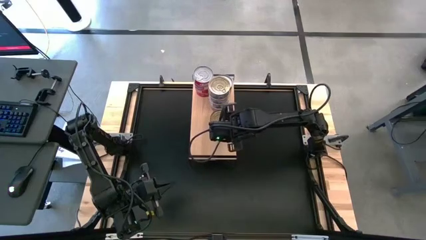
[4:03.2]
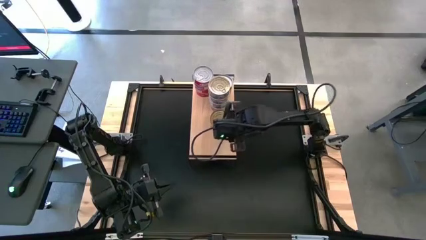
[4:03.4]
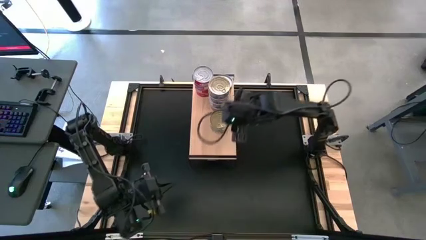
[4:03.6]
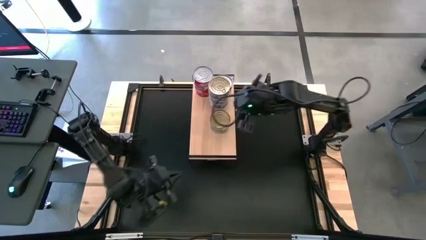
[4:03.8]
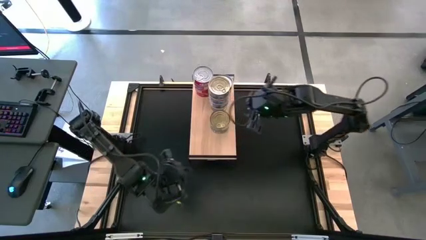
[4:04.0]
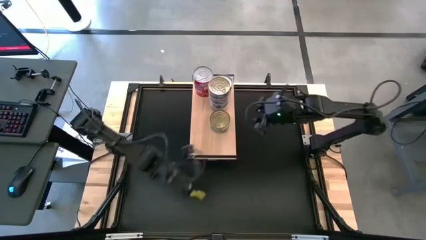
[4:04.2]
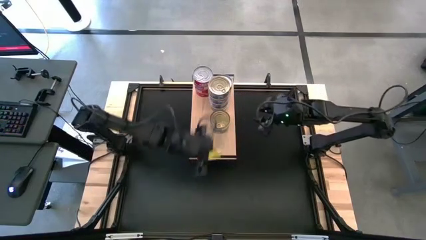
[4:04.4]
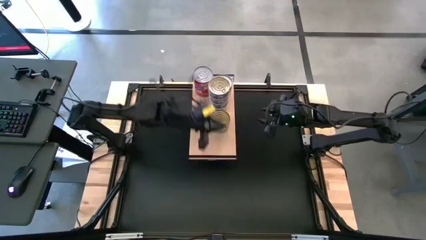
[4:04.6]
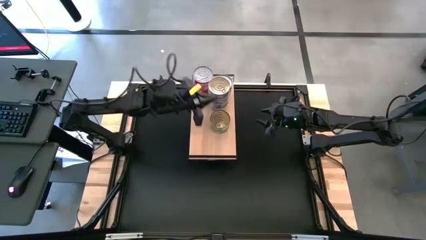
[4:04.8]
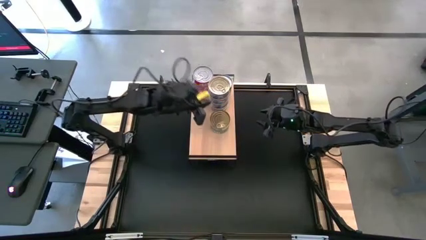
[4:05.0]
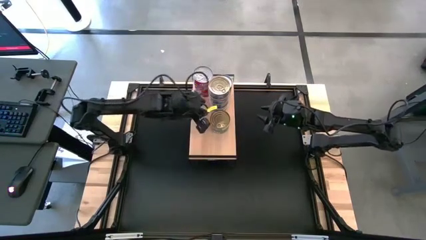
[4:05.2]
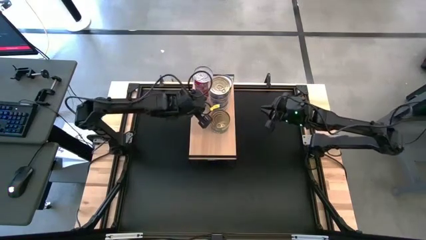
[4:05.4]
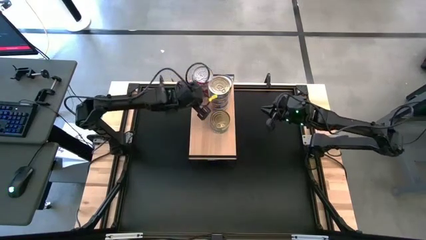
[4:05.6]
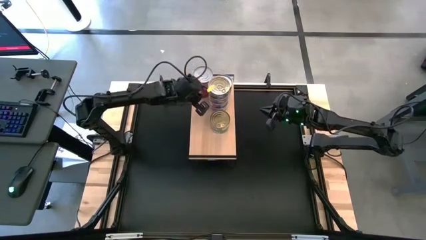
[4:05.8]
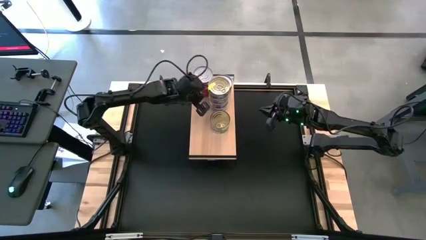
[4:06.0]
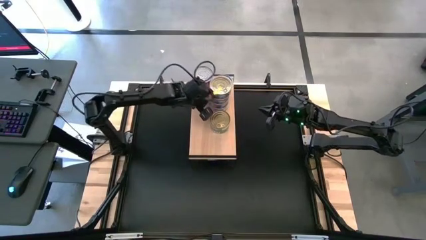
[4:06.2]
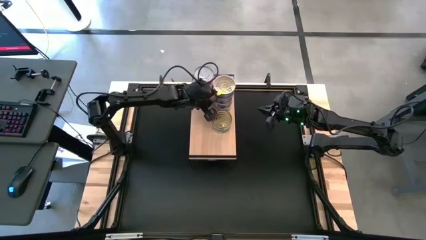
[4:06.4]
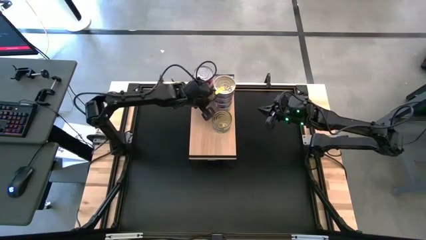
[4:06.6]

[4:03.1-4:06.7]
Task: Stack canned seafood by type on shelf
Adjust the stacked tuna cans on the shelf

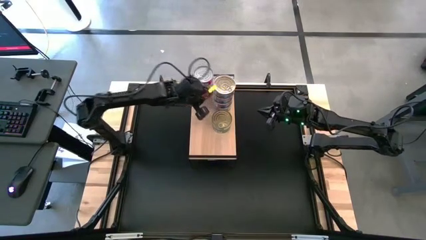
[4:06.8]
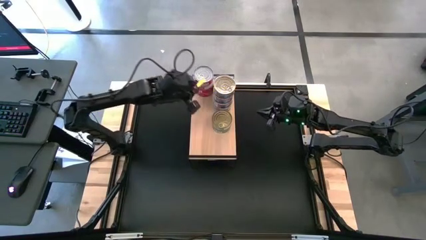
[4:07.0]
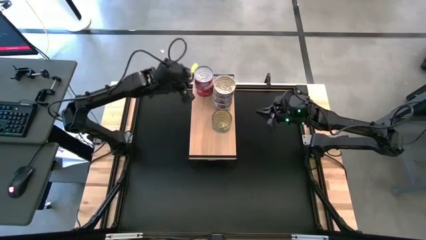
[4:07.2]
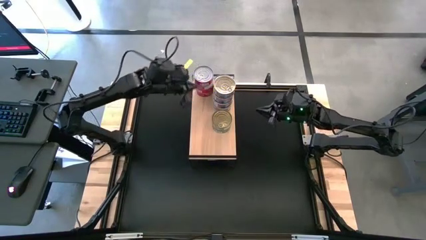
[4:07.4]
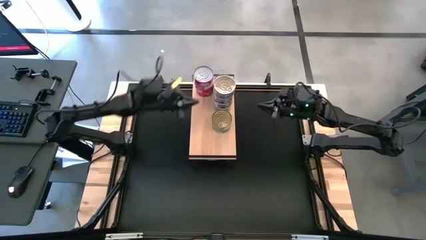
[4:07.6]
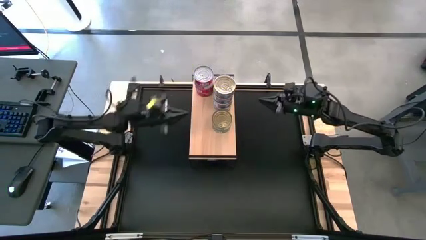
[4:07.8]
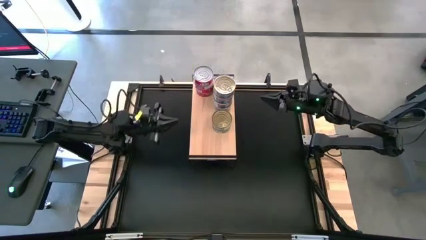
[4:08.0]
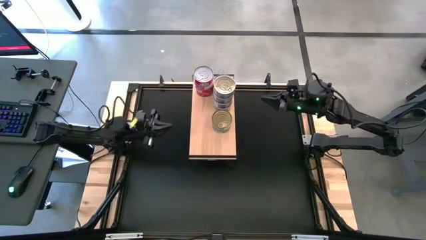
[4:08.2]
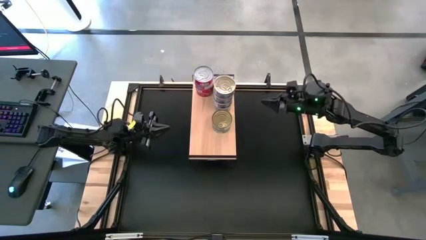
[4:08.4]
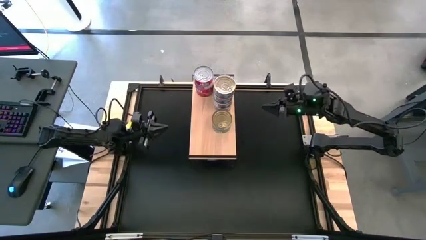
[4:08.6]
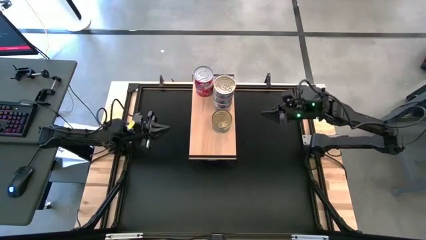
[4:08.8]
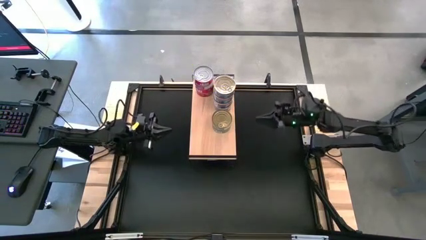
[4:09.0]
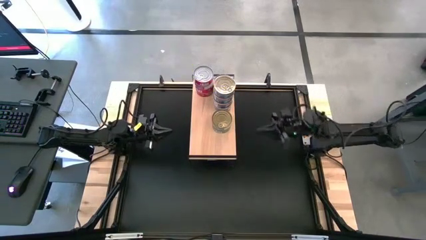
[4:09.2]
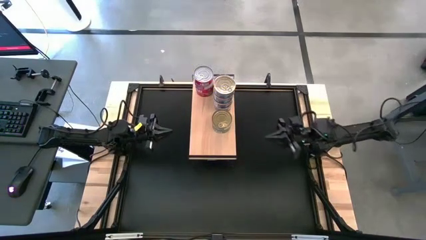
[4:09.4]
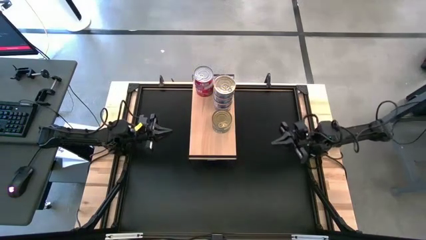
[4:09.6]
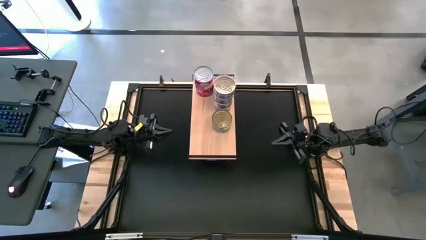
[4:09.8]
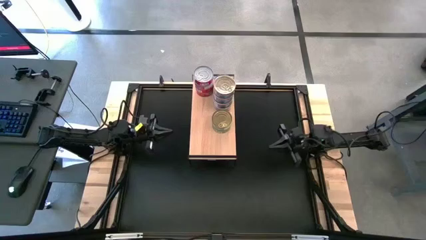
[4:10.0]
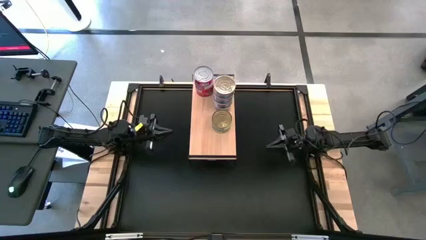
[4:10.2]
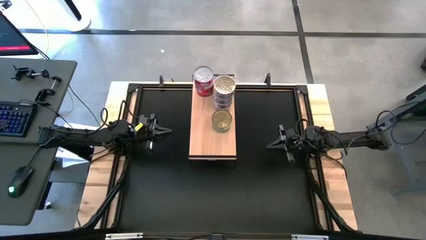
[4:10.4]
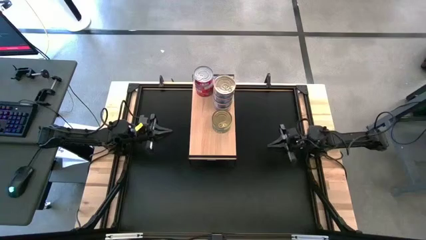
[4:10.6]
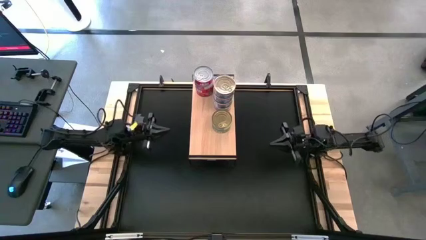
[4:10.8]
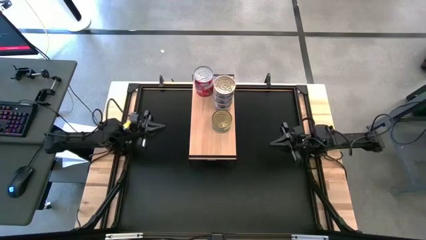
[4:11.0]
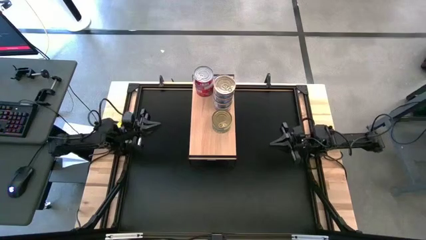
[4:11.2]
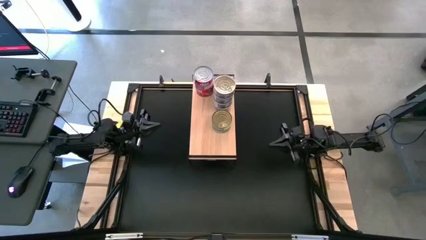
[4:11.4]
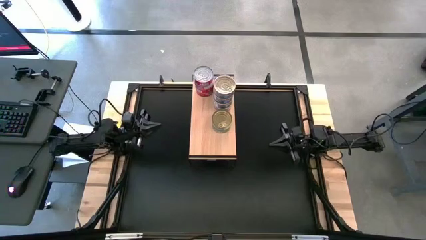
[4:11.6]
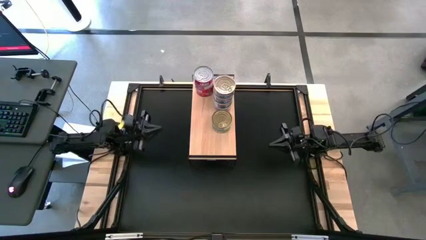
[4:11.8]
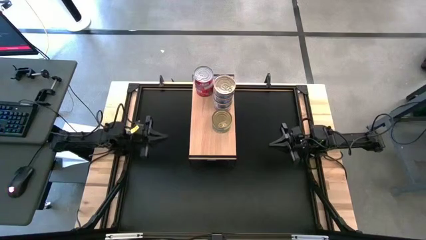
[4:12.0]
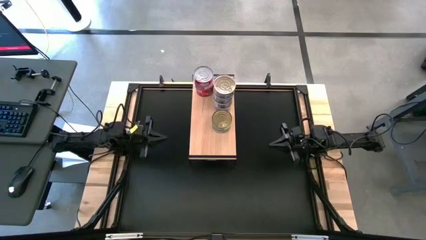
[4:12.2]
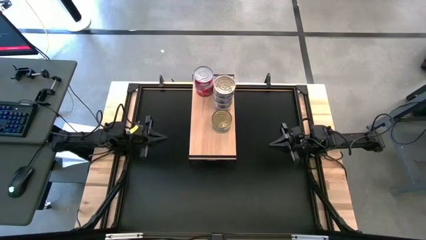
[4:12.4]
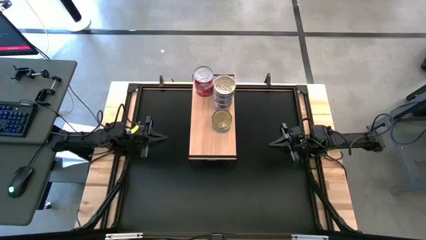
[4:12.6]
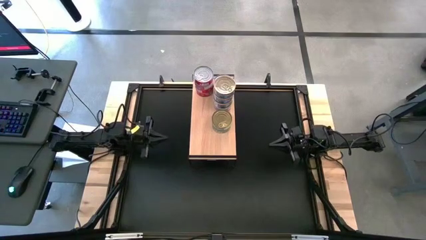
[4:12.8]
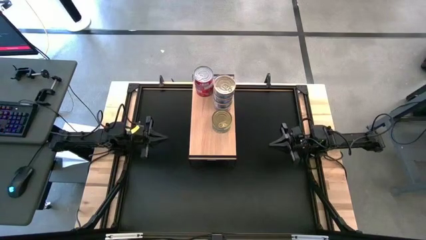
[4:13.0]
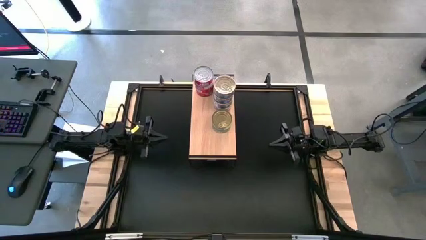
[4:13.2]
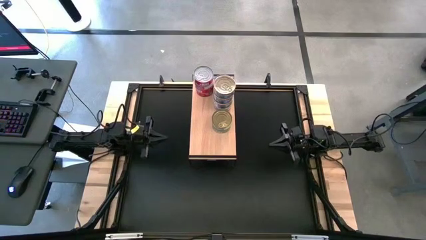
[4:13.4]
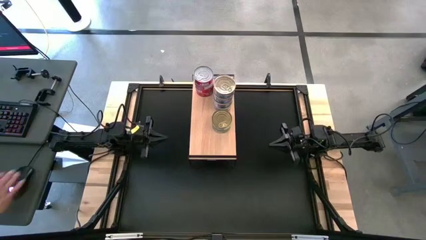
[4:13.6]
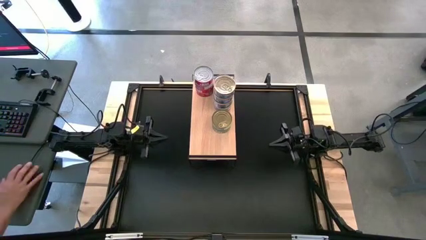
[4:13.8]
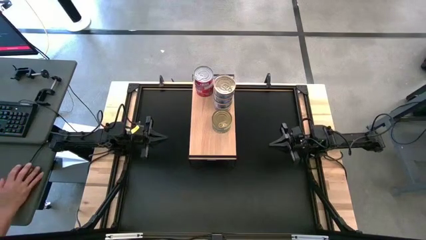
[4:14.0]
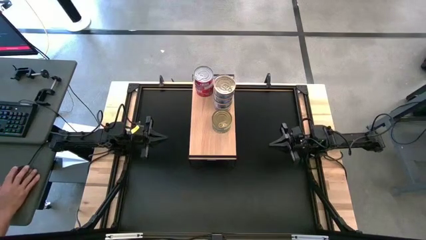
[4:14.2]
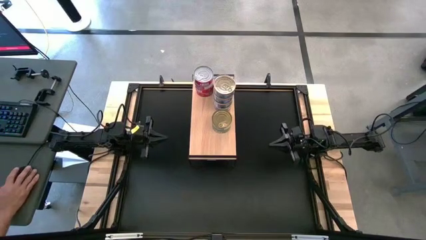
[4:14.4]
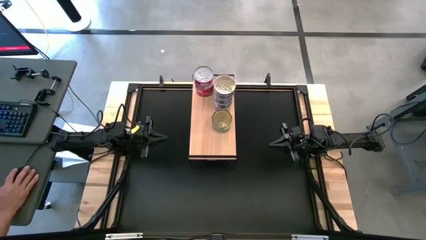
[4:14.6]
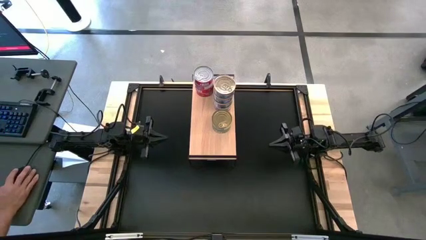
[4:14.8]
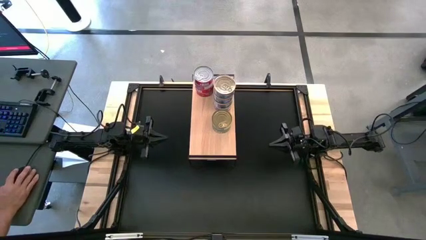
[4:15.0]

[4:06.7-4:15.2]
Return to Home Position

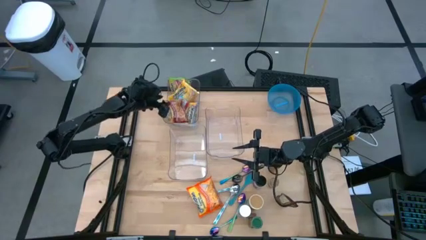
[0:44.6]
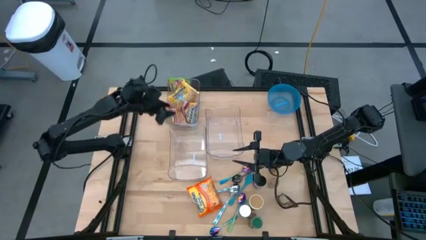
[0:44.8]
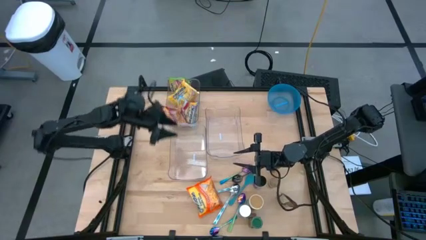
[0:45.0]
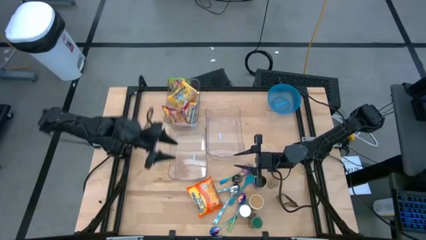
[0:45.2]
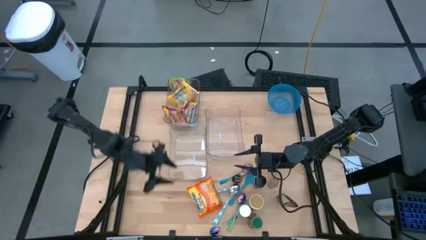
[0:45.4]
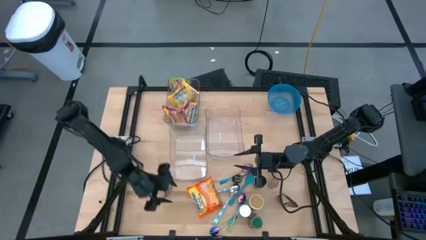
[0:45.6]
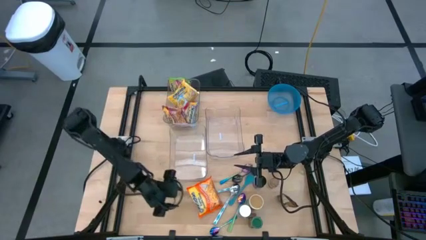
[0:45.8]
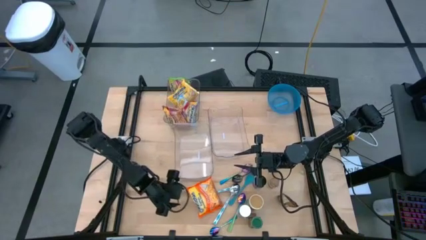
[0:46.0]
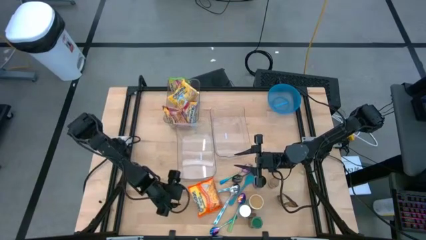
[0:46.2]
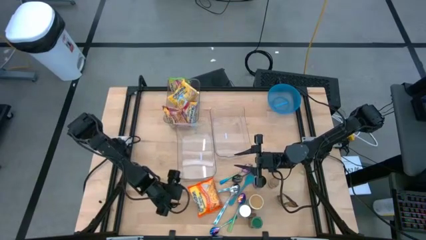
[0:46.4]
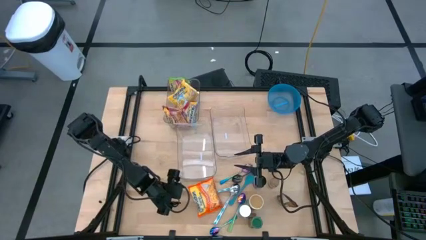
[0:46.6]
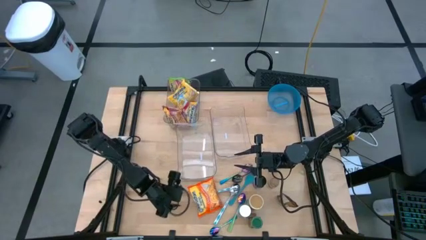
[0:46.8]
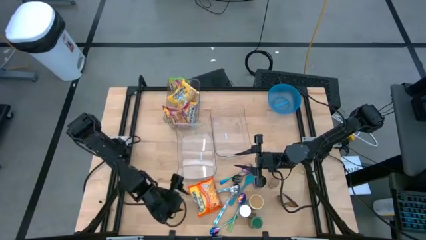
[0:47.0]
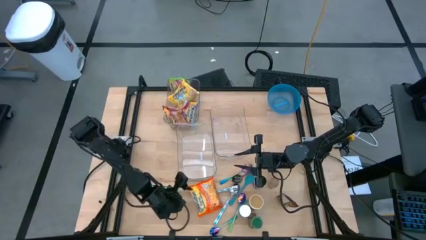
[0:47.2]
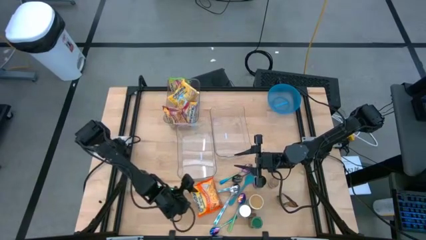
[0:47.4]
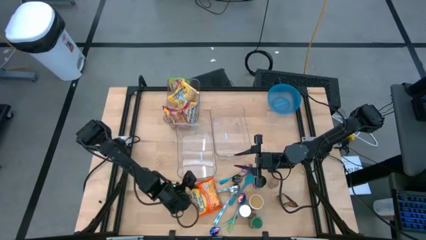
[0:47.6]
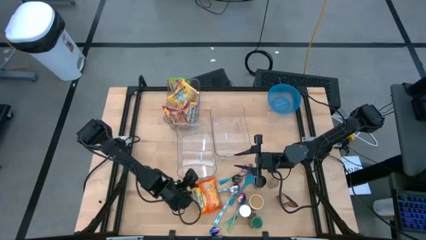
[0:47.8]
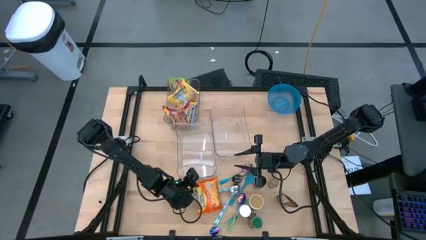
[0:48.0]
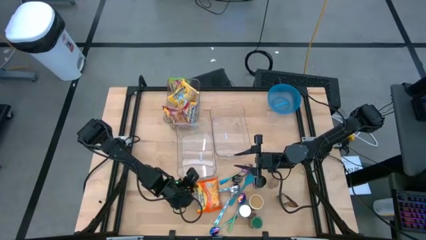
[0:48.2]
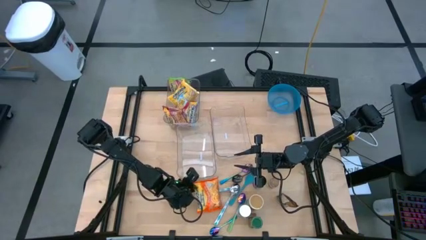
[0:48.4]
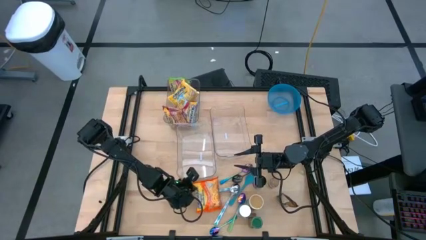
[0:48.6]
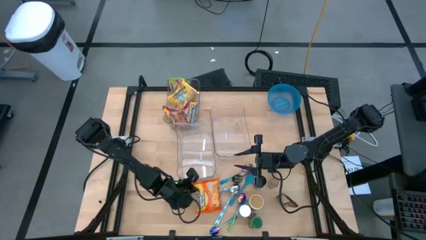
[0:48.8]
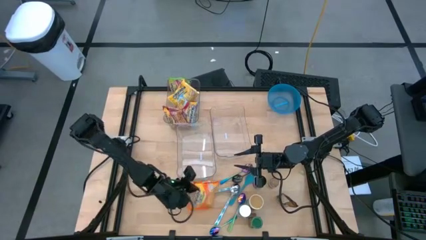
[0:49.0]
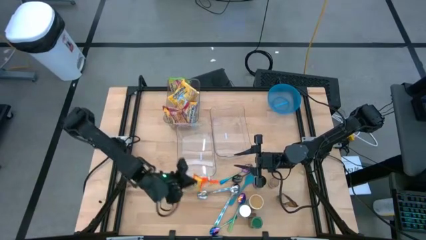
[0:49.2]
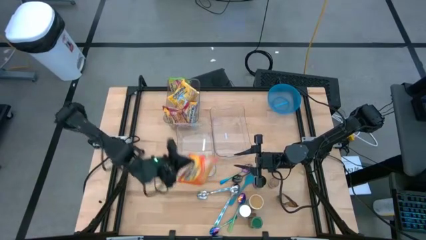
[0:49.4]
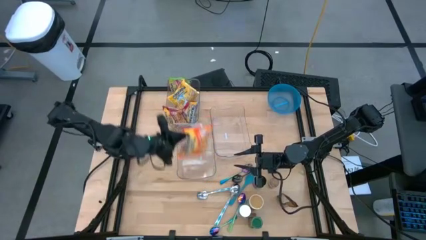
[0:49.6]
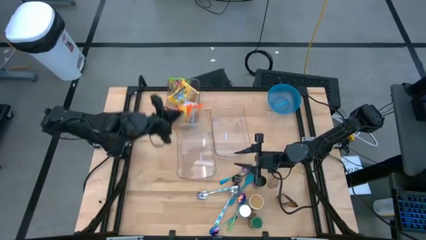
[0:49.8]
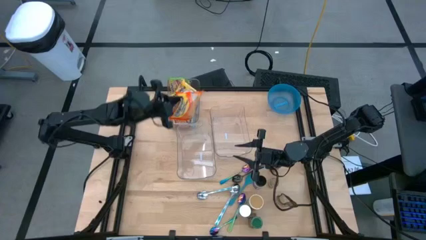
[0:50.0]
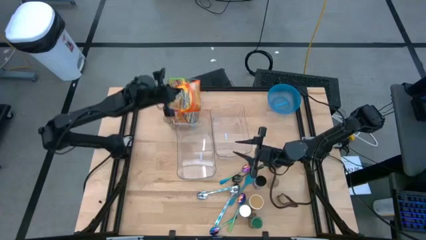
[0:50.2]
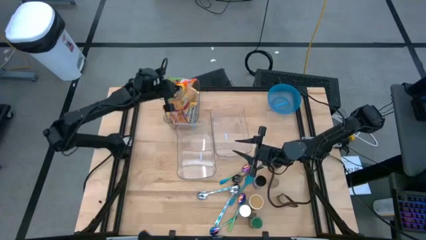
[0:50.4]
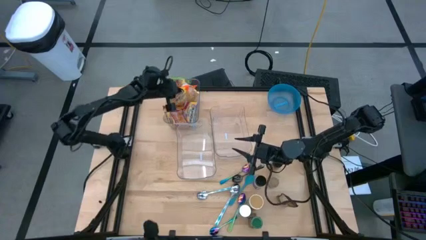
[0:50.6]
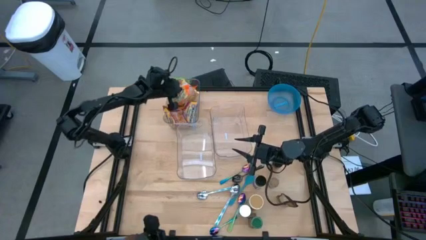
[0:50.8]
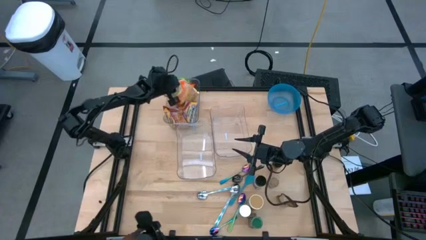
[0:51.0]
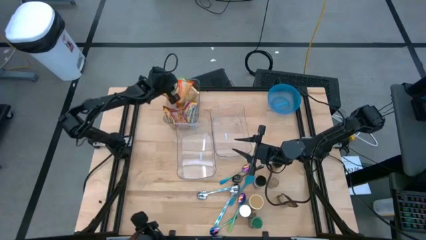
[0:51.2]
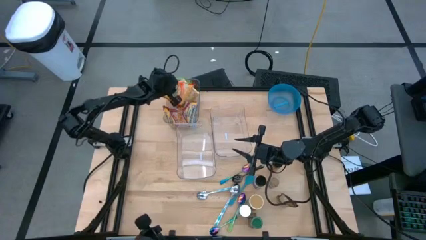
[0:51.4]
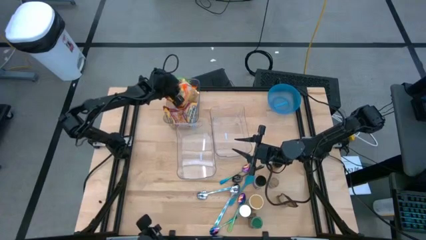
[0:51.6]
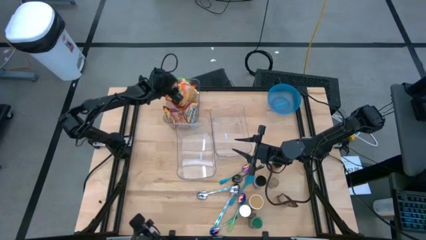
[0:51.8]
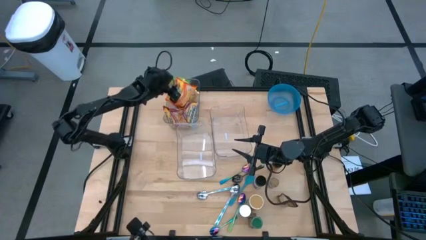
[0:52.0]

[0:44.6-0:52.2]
Task: Pick & Place Food Item
Put the orange noodle pack into the top transparent bin
